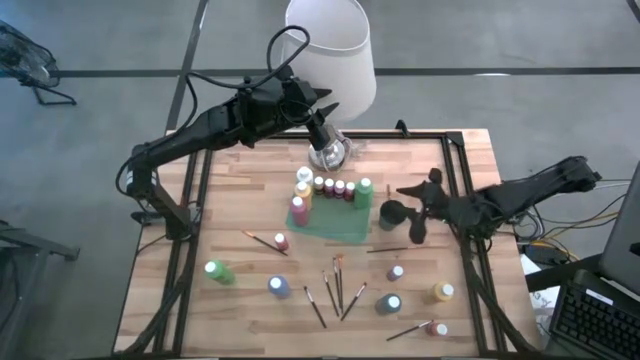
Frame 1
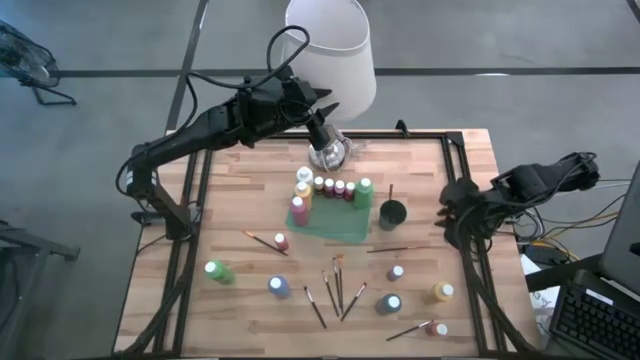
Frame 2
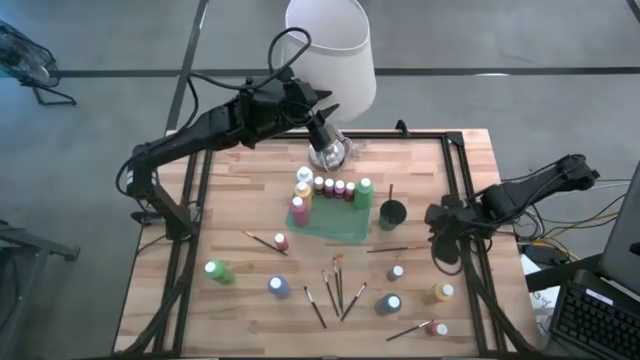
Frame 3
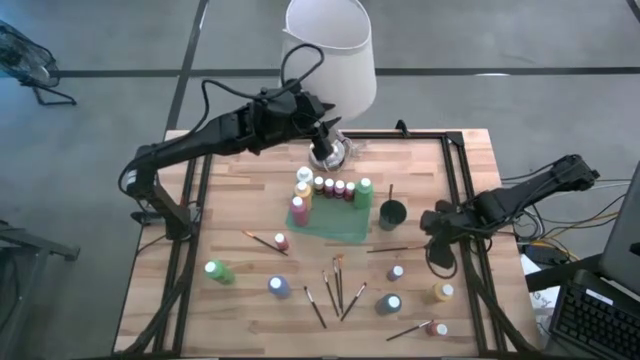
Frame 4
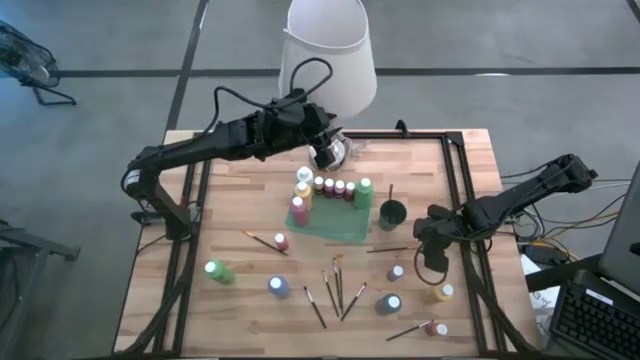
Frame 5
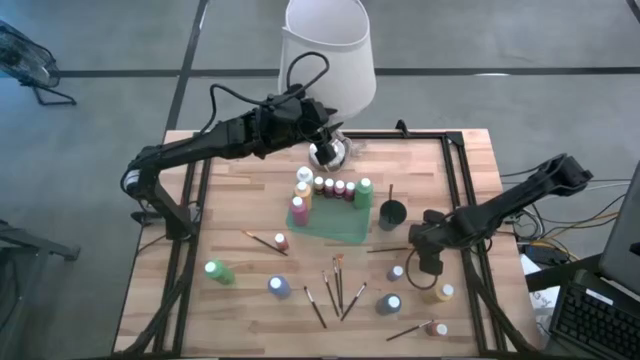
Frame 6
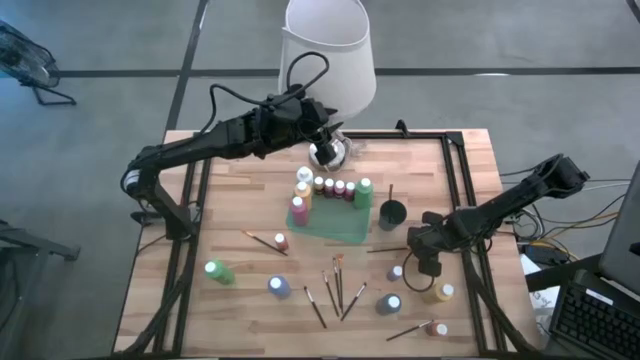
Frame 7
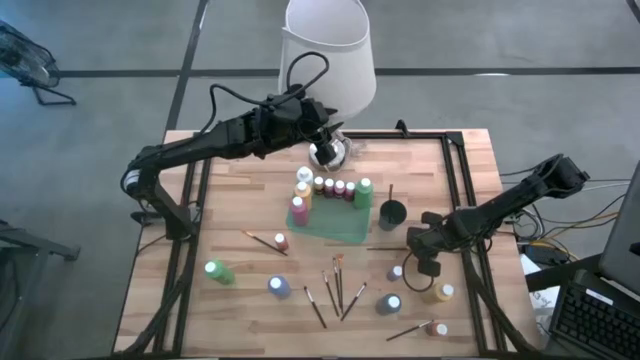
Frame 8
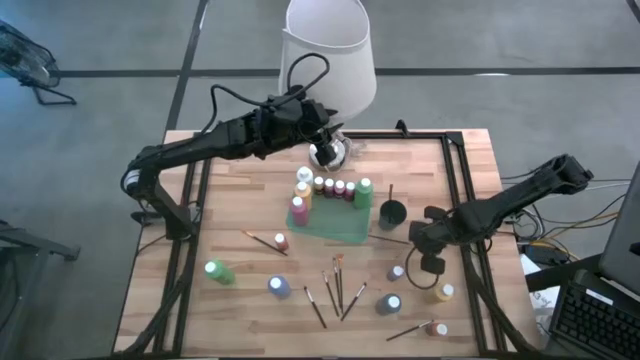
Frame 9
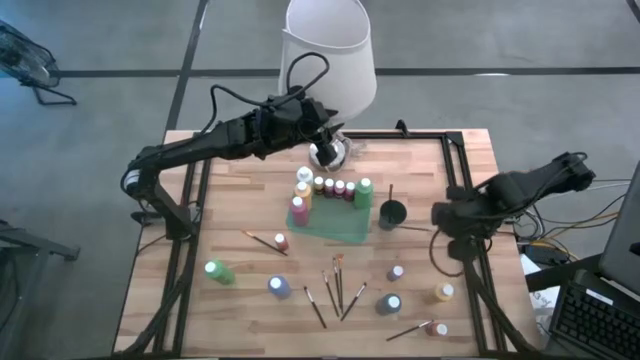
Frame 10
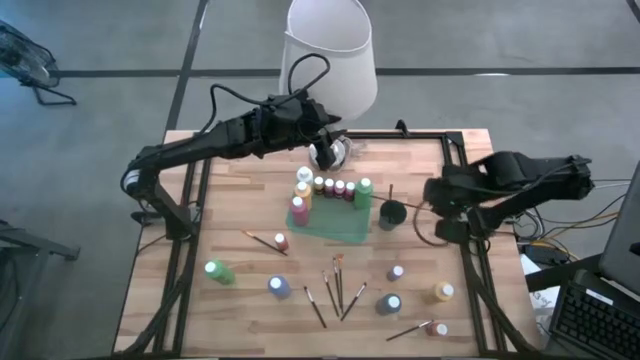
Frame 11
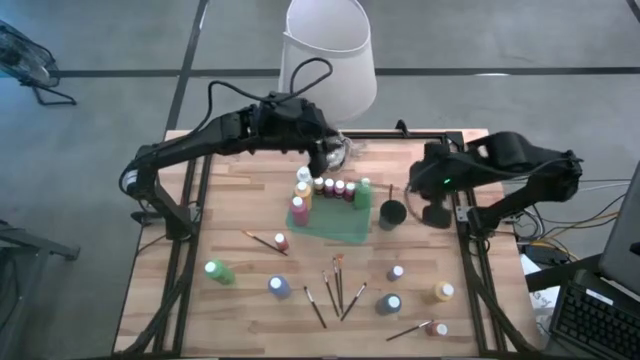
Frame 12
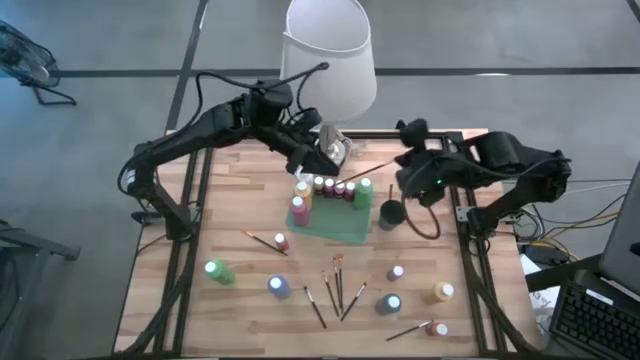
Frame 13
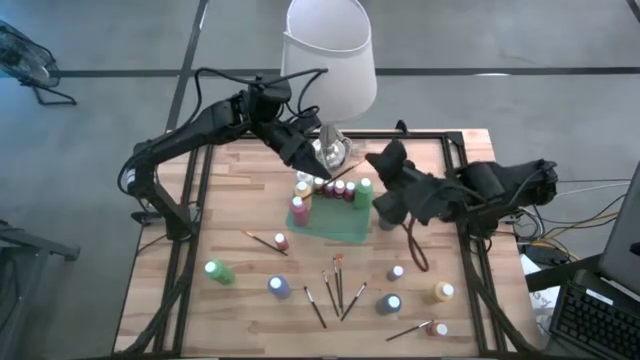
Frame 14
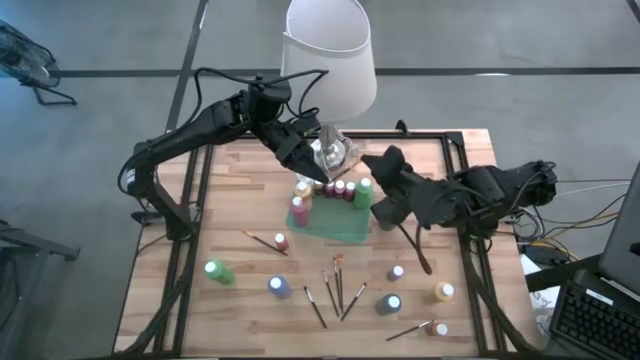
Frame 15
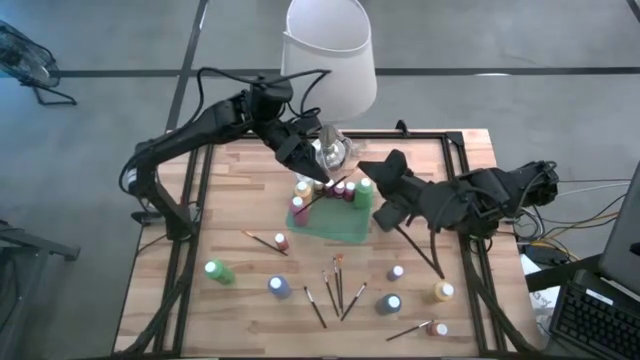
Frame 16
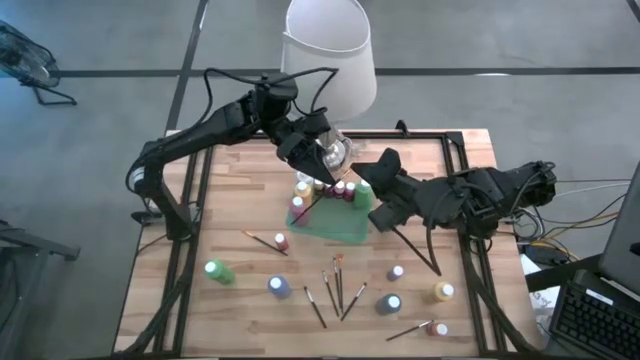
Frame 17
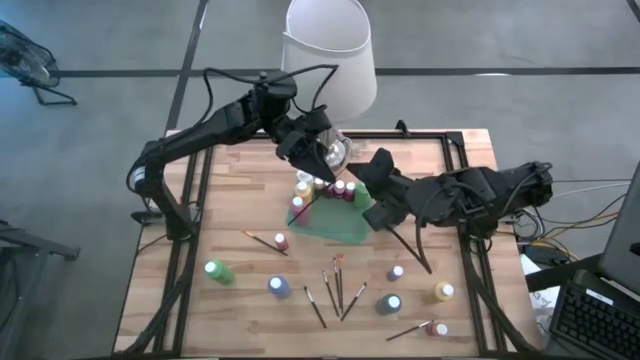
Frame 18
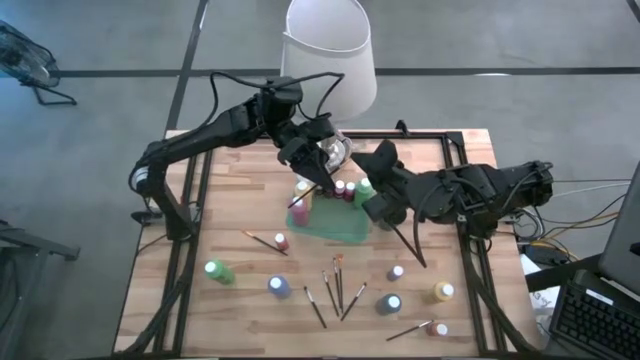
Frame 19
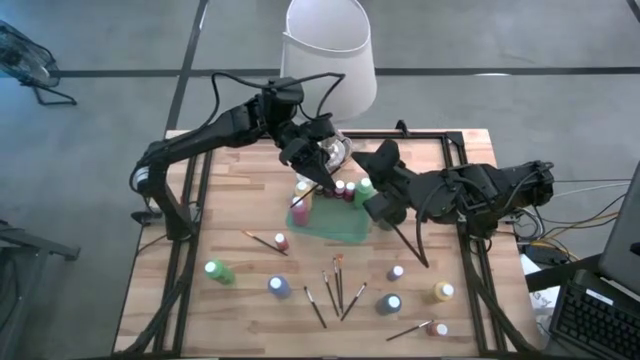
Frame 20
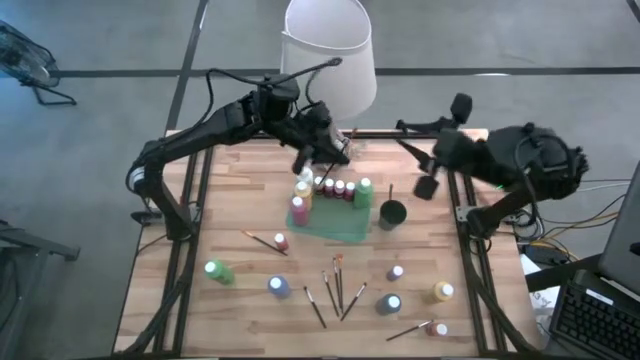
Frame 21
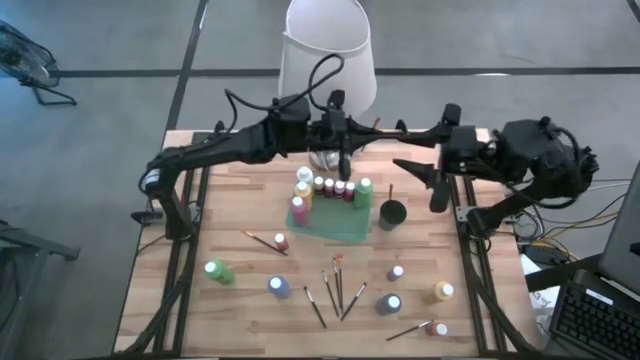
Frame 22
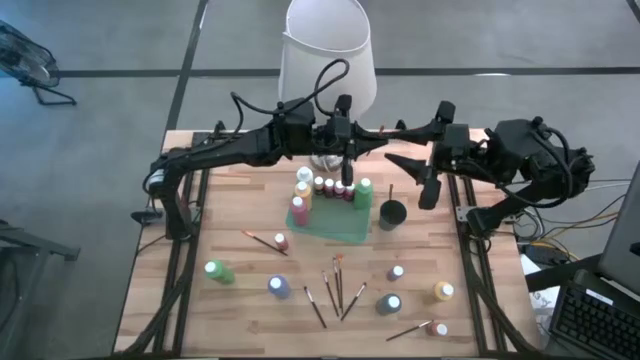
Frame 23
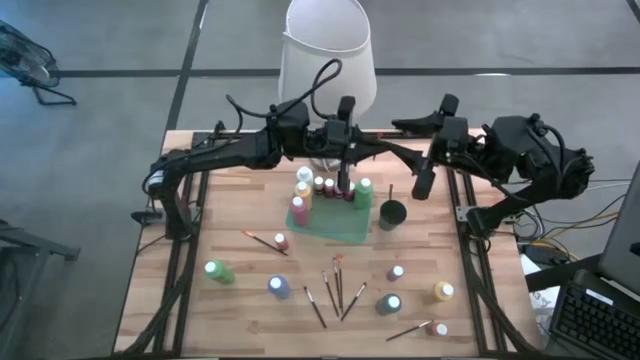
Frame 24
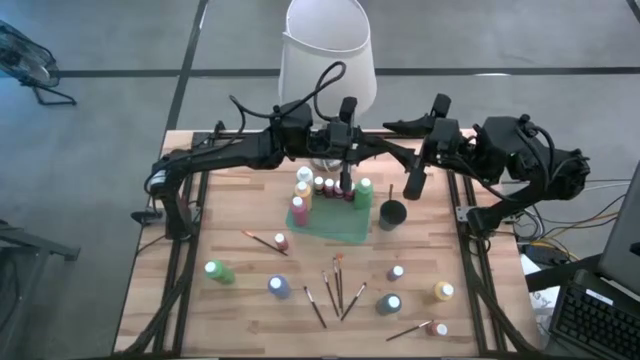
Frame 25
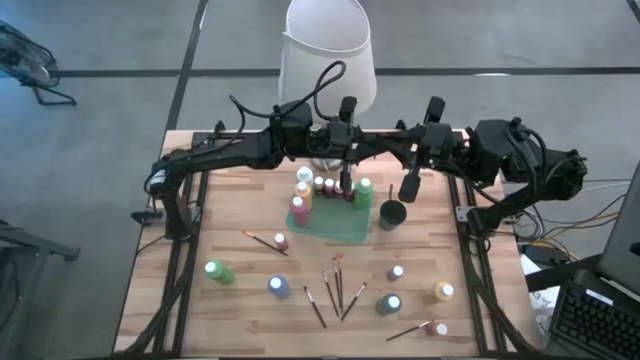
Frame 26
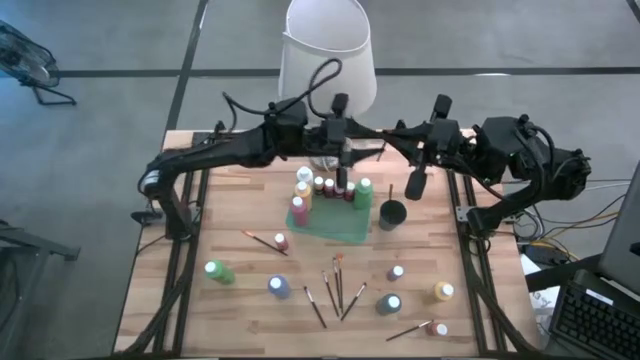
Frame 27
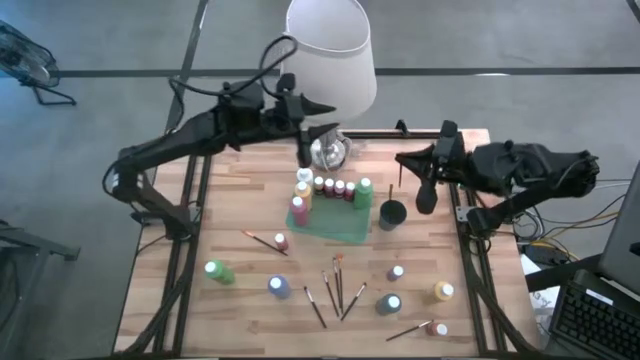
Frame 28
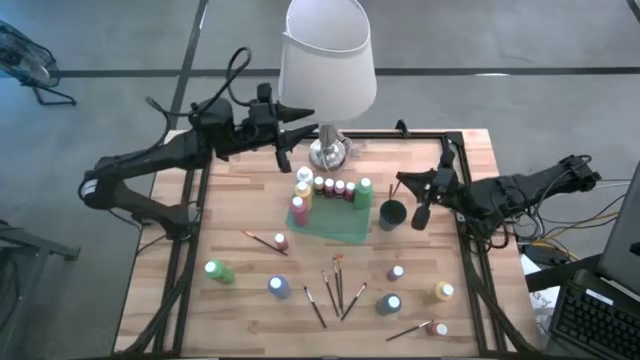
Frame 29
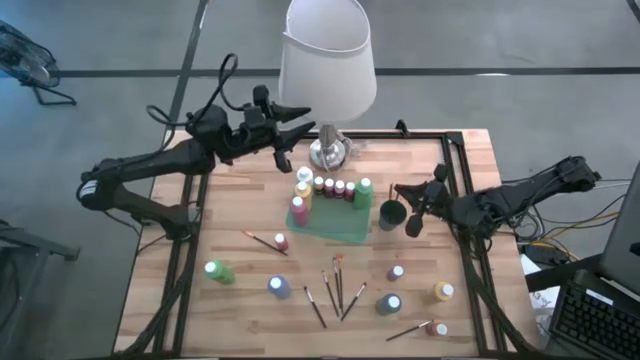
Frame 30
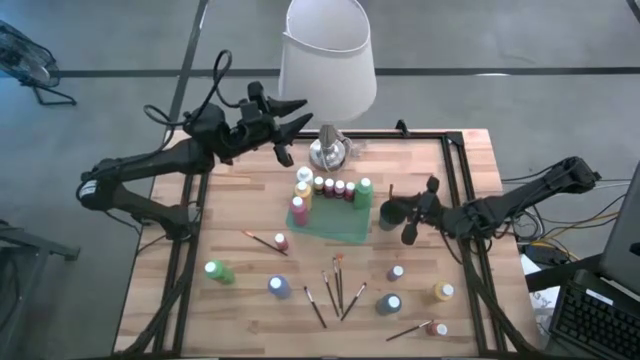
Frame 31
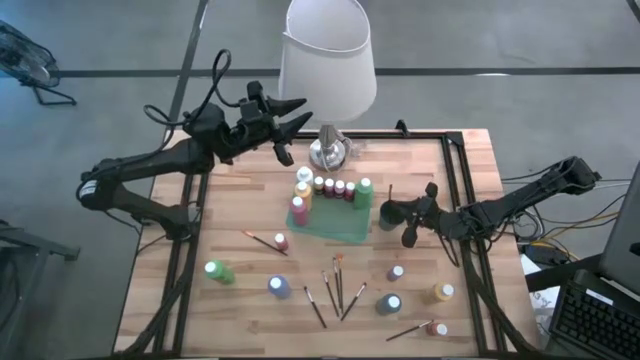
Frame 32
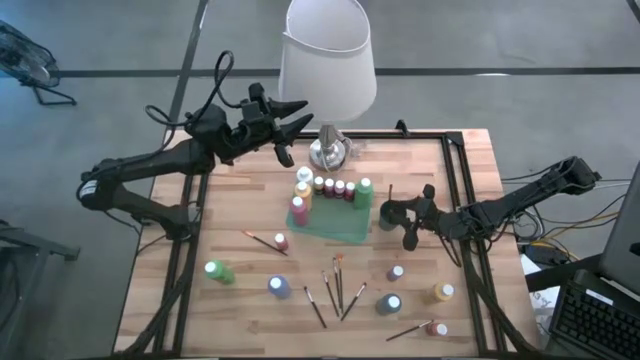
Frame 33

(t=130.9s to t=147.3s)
Task: Pick & Place Paint Supplies
Put the orange paint brush into the black cup

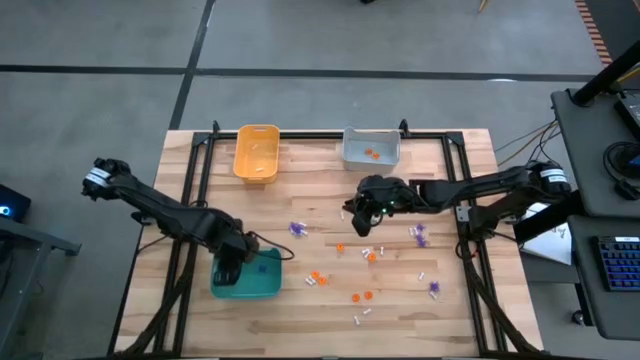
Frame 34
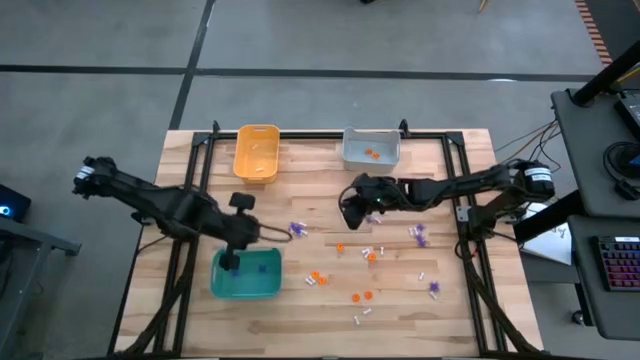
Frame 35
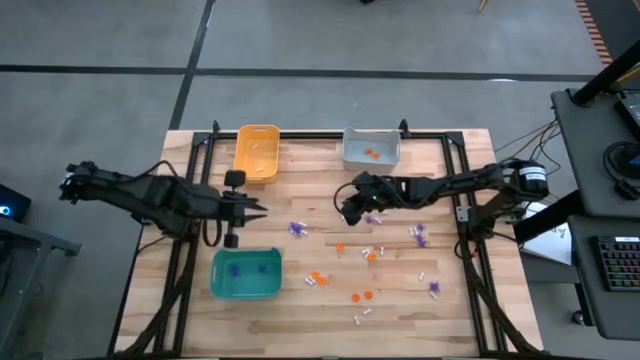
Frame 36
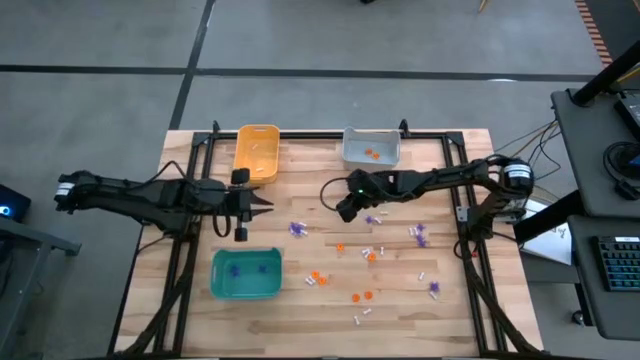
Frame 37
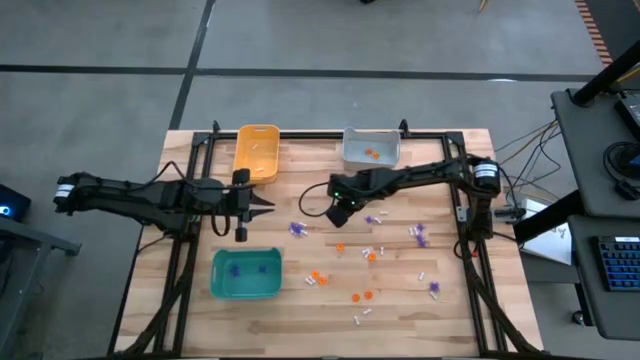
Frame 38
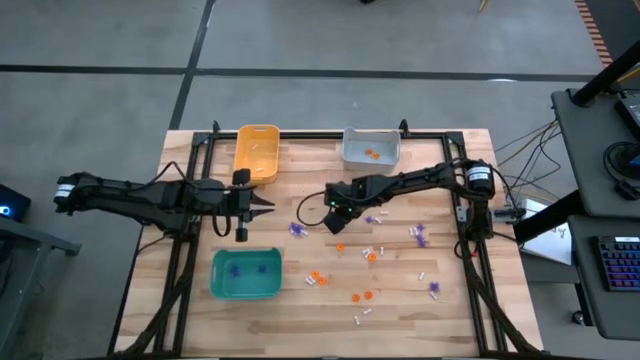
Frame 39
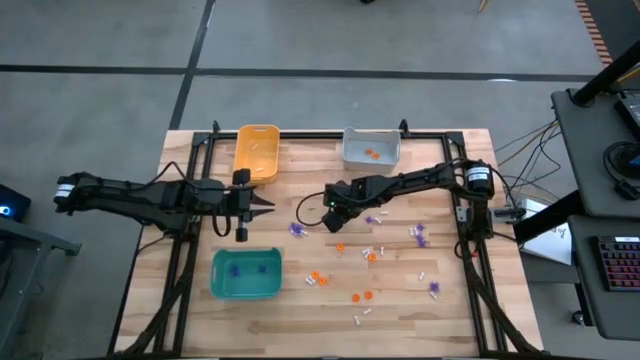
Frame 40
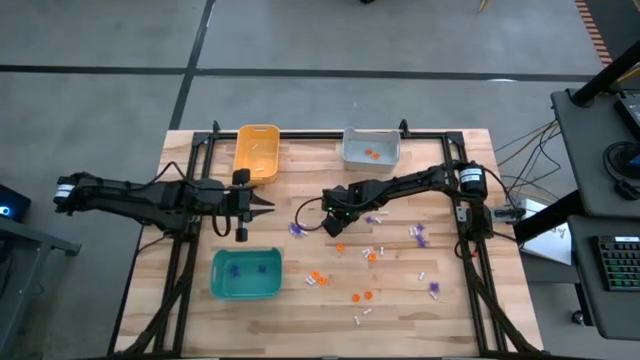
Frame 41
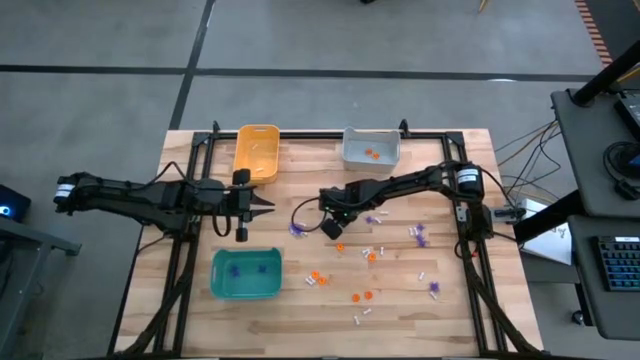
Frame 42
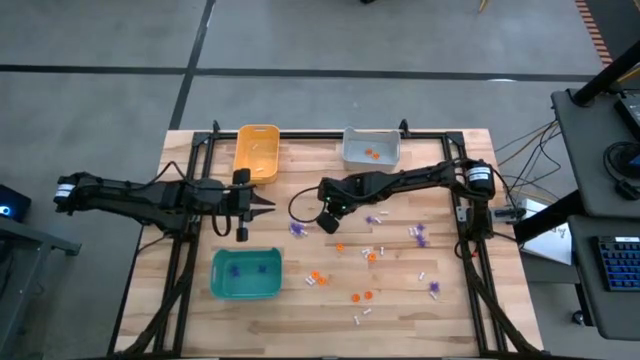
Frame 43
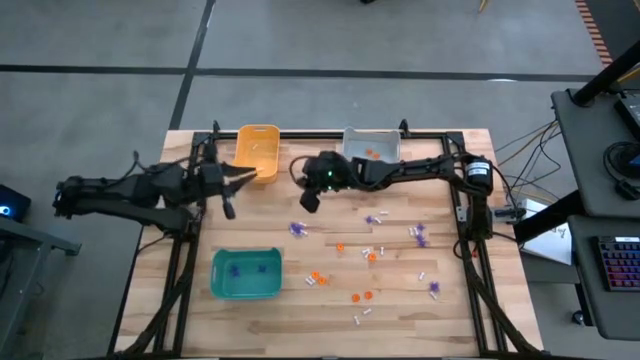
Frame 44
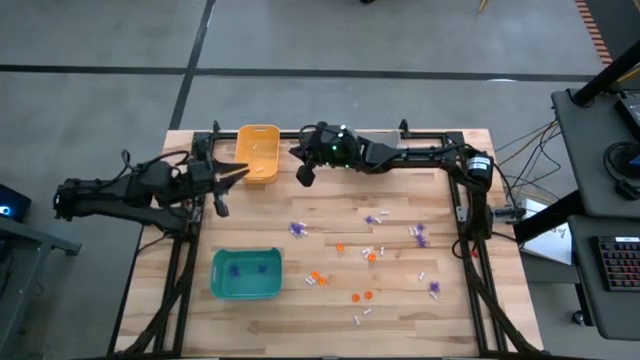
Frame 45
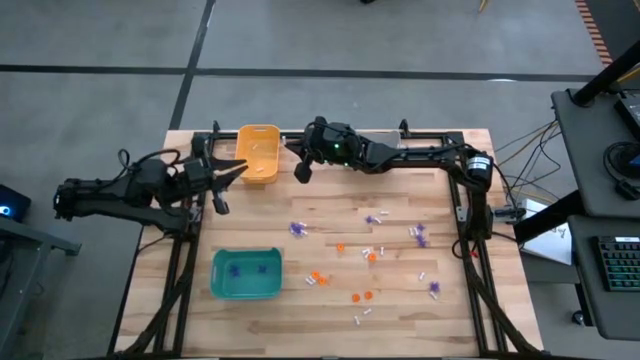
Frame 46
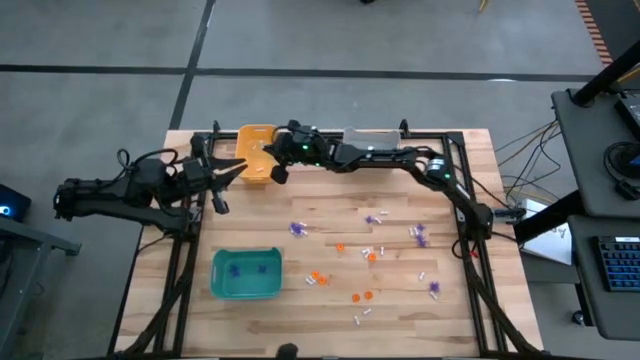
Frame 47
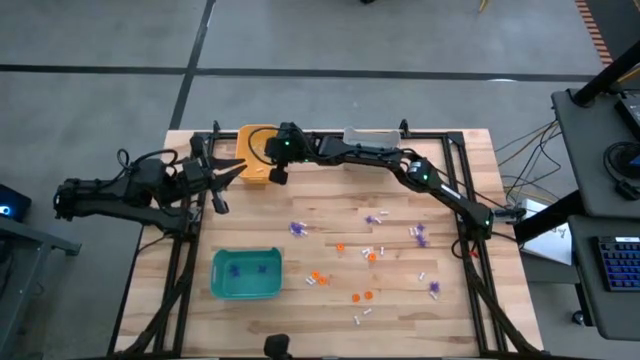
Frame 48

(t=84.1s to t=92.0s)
Task: Sort Halloween decoration
Put the white bone toy into the orange bin
